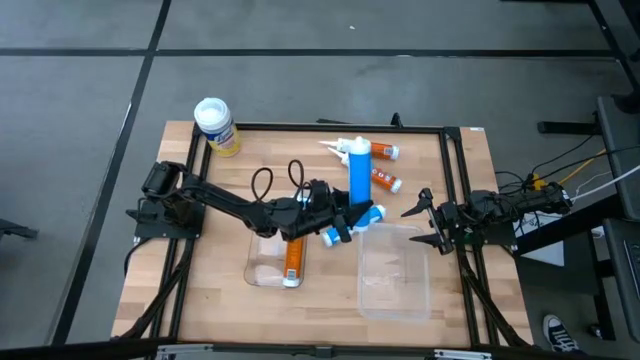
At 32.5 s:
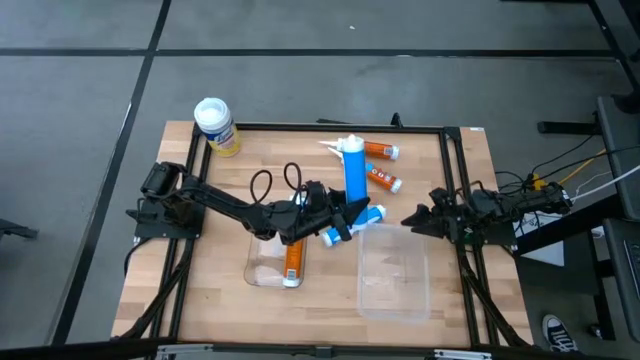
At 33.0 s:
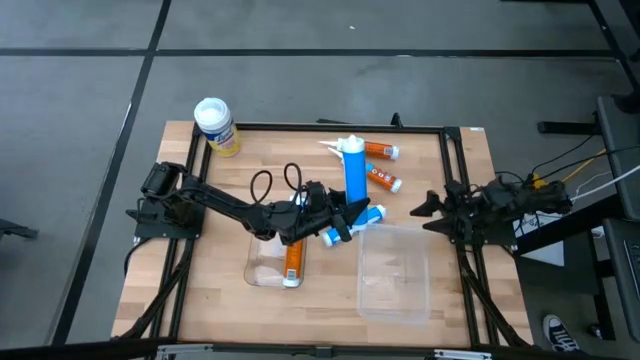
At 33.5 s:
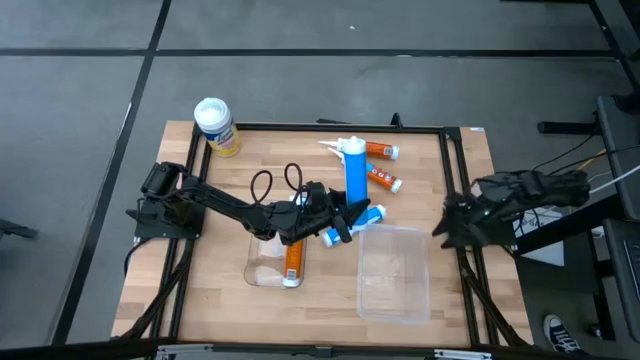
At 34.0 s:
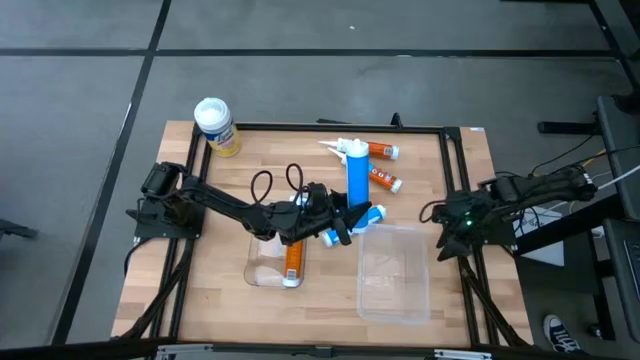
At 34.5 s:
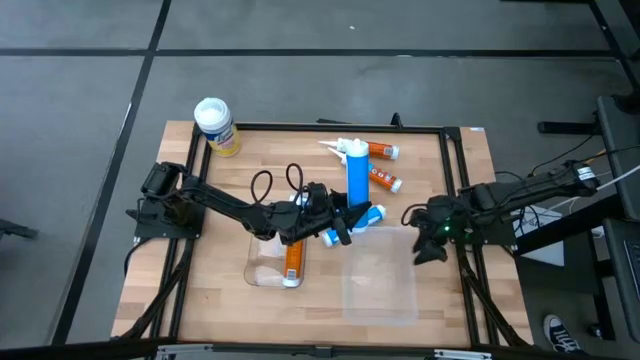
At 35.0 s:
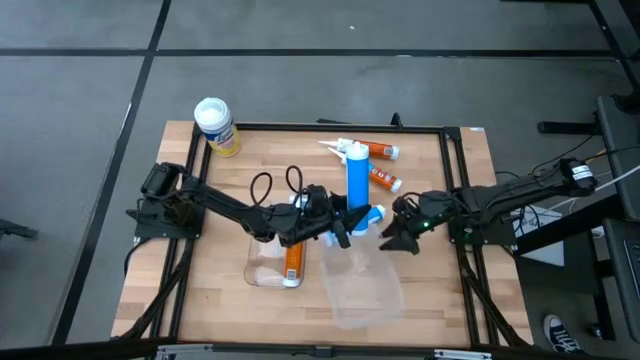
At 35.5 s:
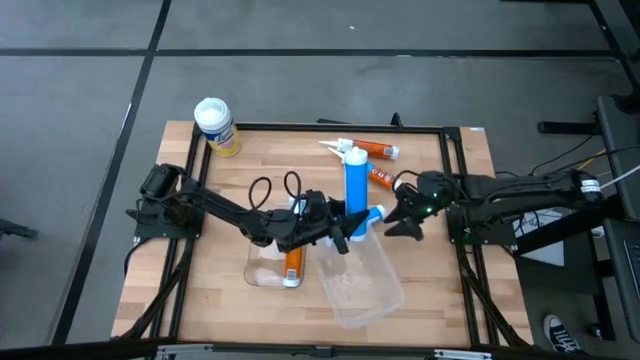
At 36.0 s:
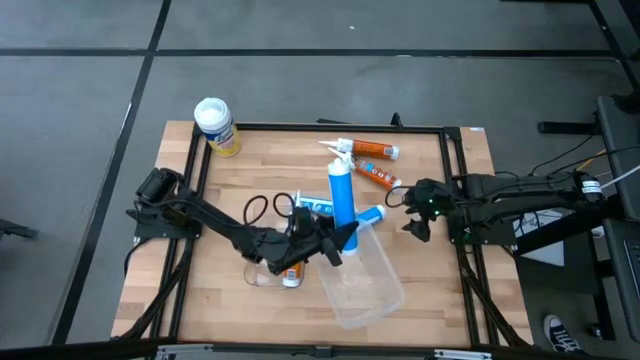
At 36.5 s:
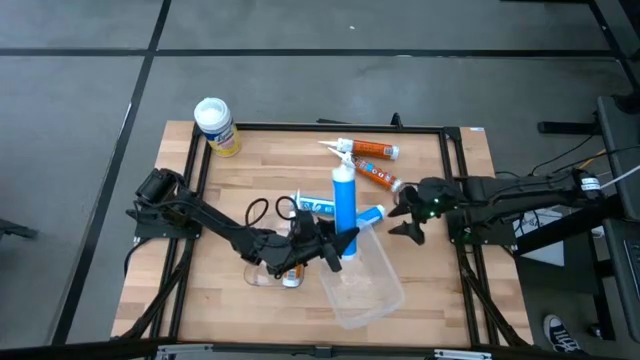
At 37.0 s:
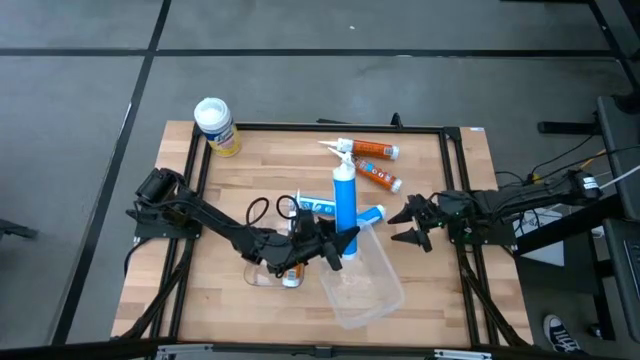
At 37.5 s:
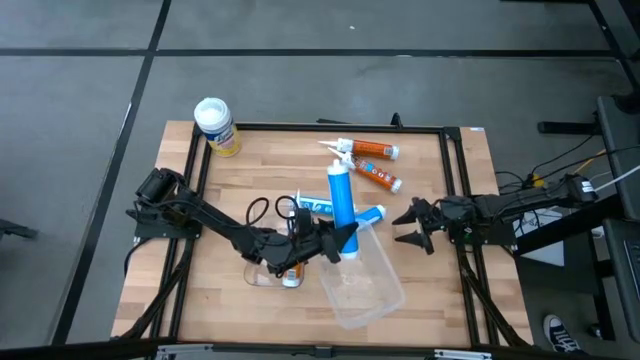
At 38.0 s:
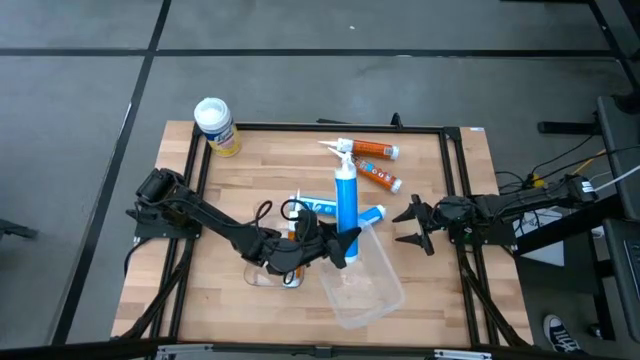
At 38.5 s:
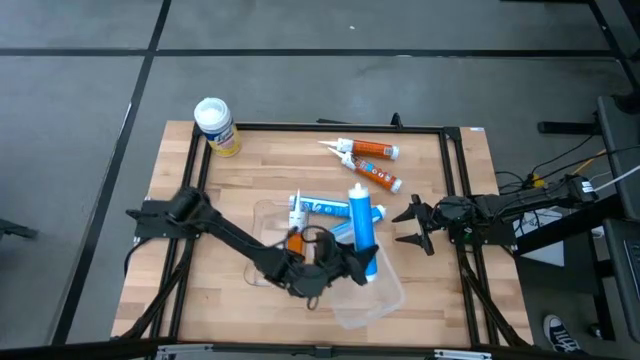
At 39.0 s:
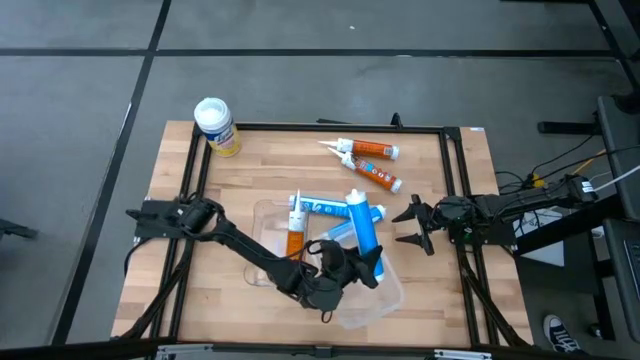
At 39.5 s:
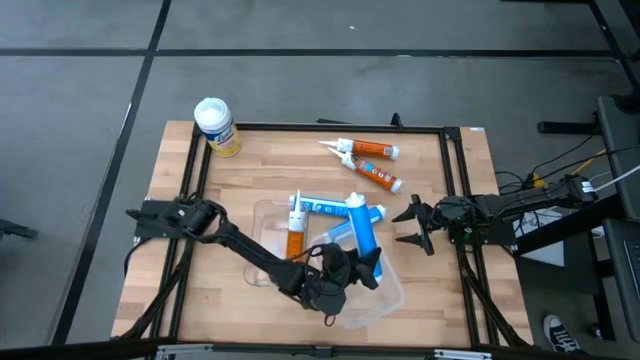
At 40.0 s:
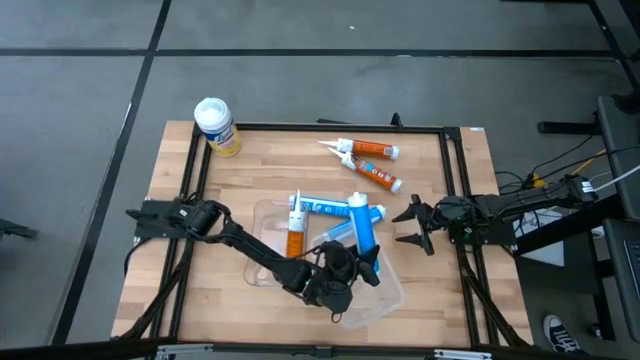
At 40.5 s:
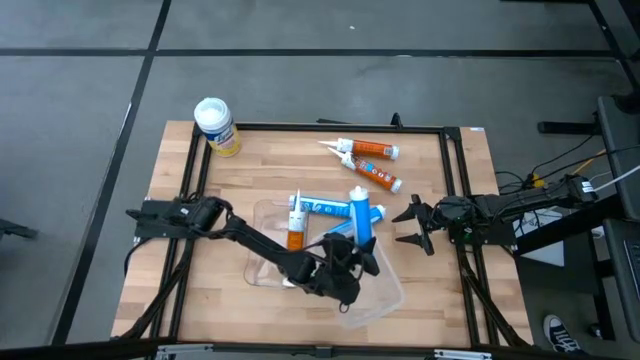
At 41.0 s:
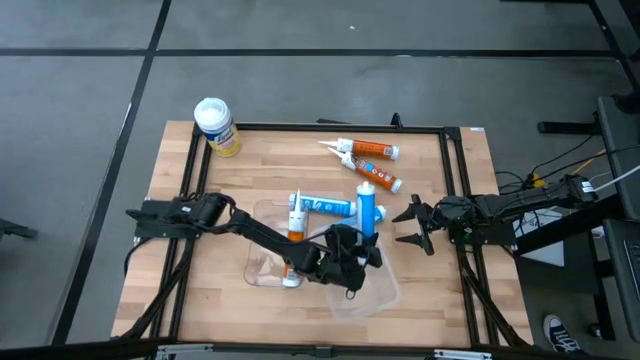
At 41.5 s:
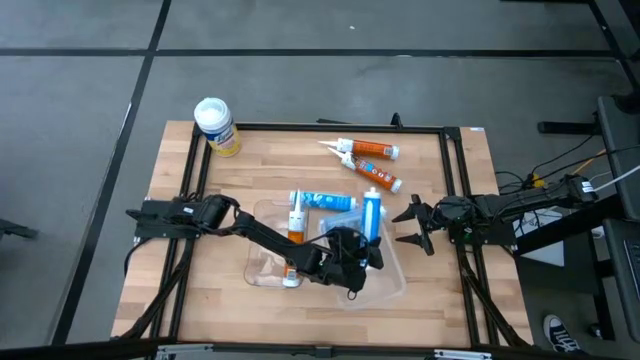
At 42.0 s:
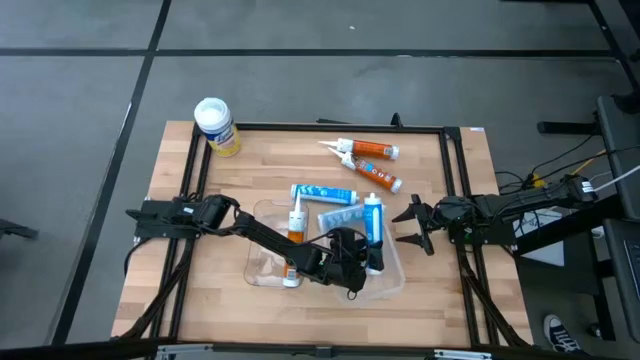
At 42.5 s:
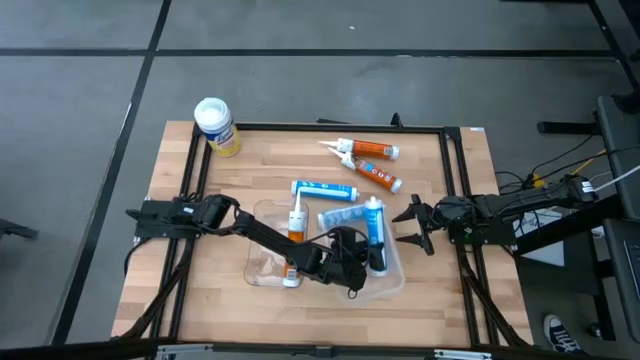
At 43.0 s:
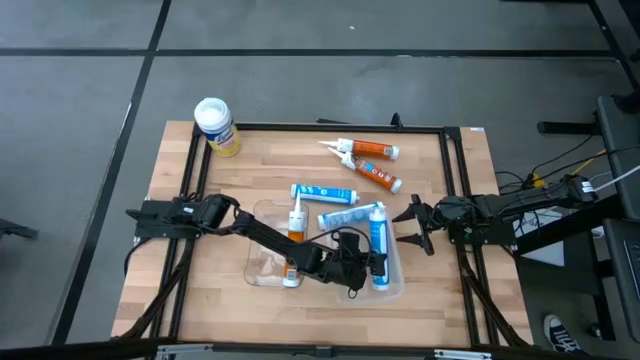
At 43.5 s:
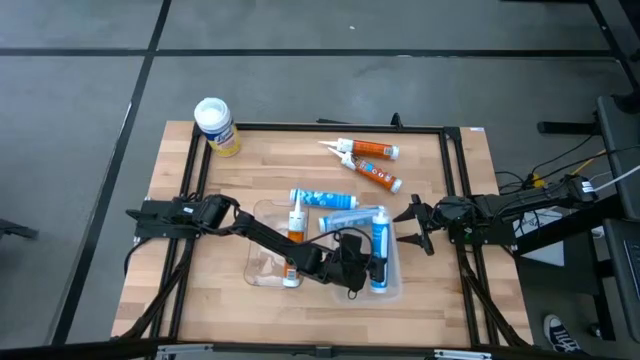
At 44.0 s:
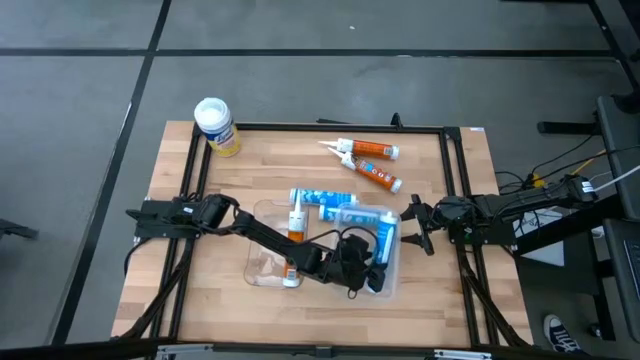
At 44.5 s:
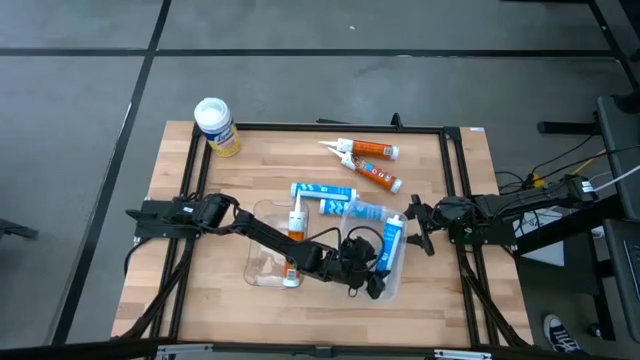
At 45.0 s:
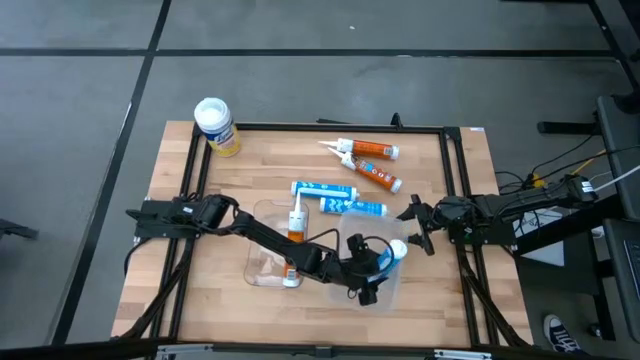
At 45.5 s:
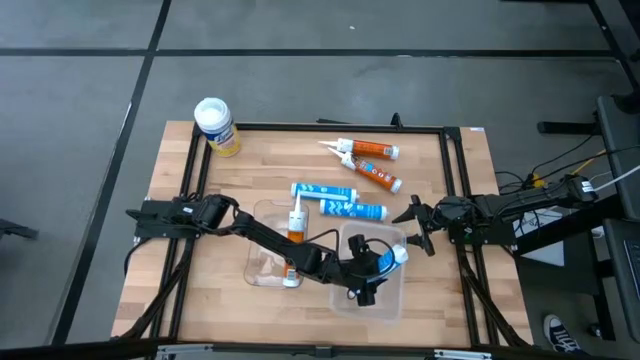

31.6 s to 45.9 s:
Task: Pick & place silicon tubes, Sealant and Lysol wipes
Put the top blue sealant into the right transparent bin

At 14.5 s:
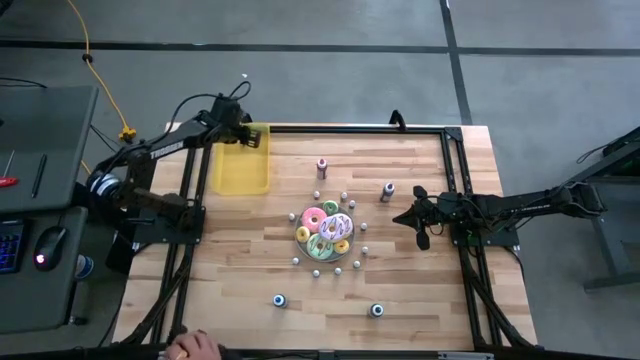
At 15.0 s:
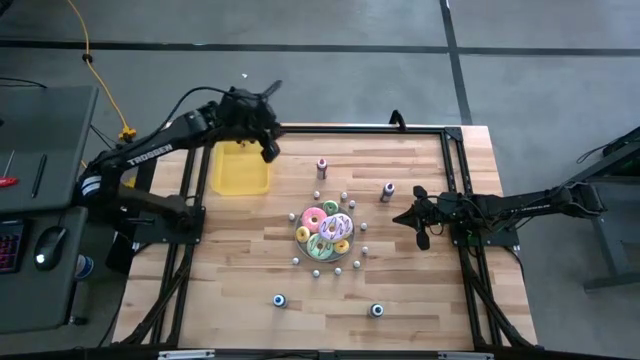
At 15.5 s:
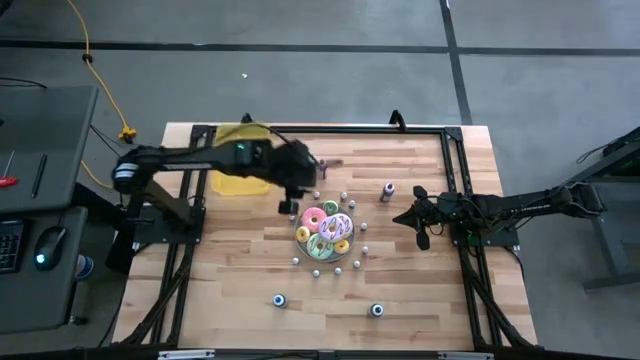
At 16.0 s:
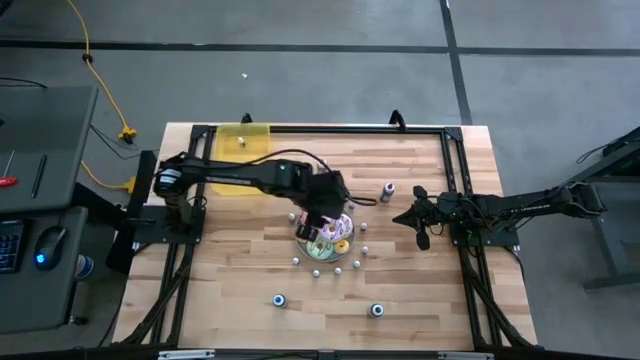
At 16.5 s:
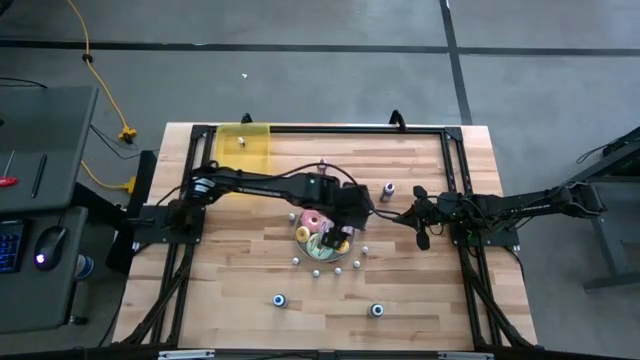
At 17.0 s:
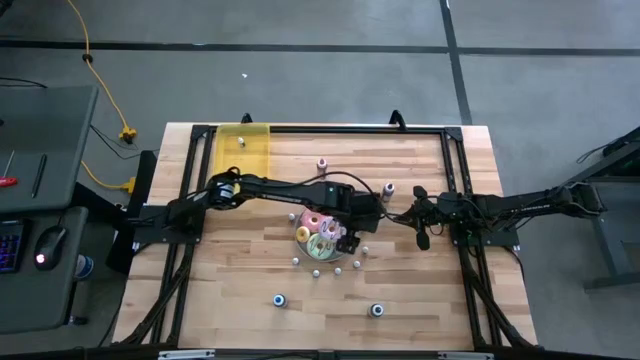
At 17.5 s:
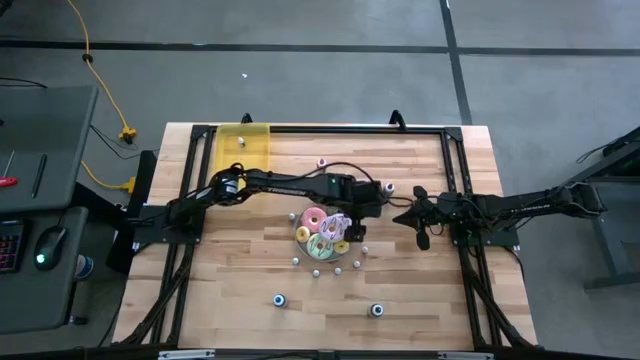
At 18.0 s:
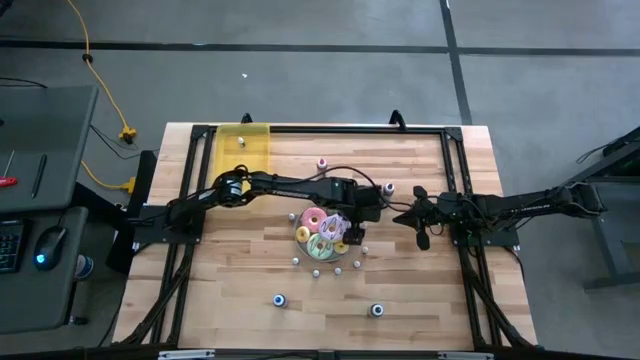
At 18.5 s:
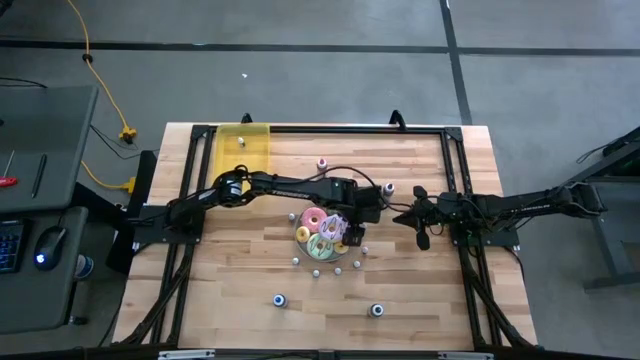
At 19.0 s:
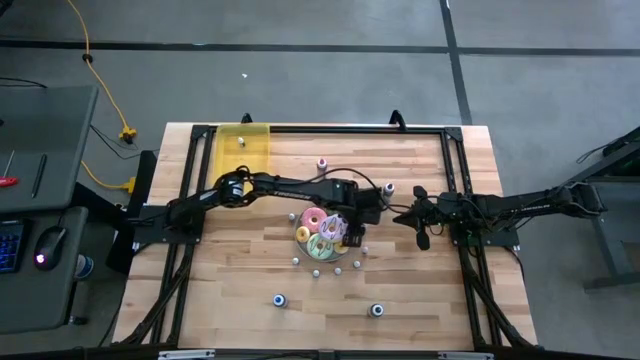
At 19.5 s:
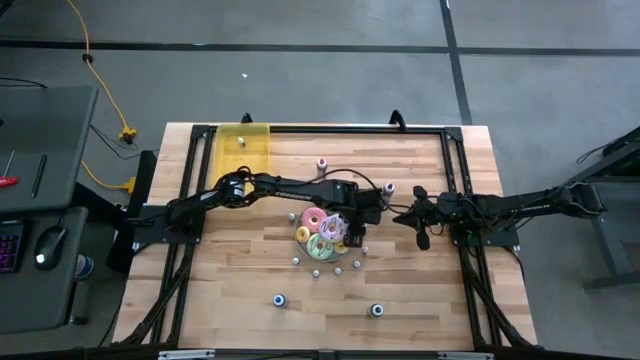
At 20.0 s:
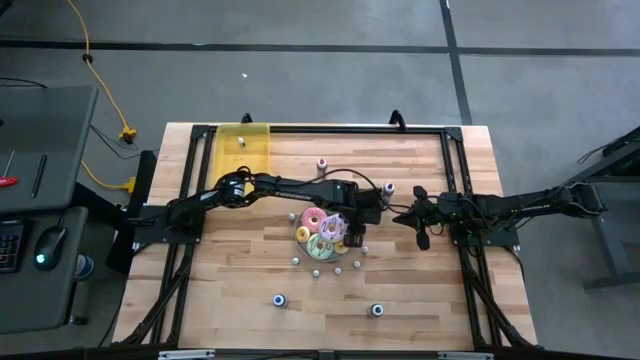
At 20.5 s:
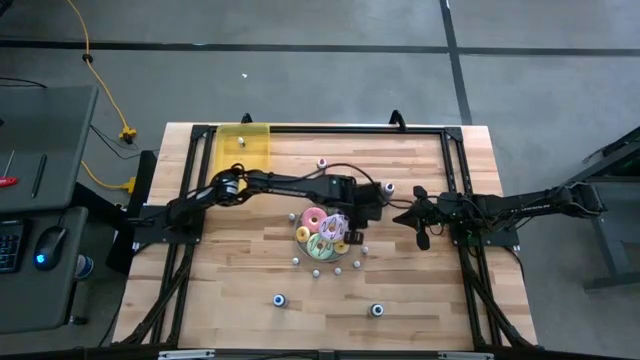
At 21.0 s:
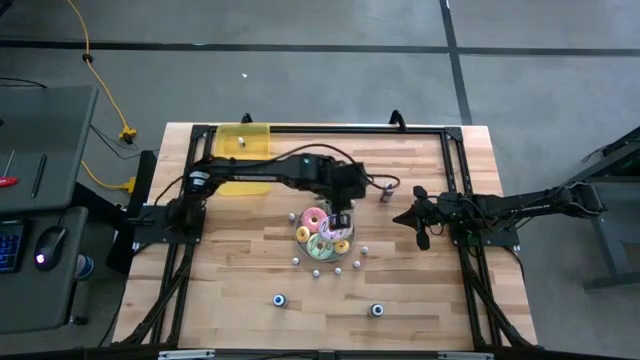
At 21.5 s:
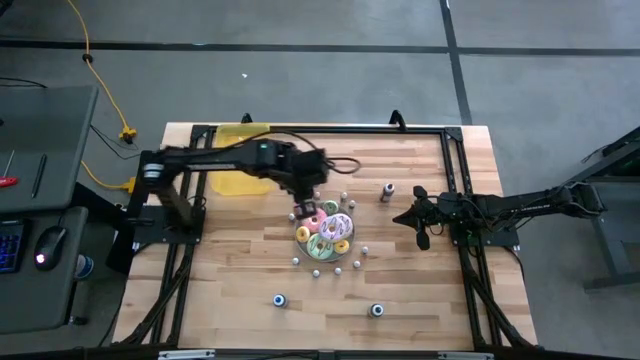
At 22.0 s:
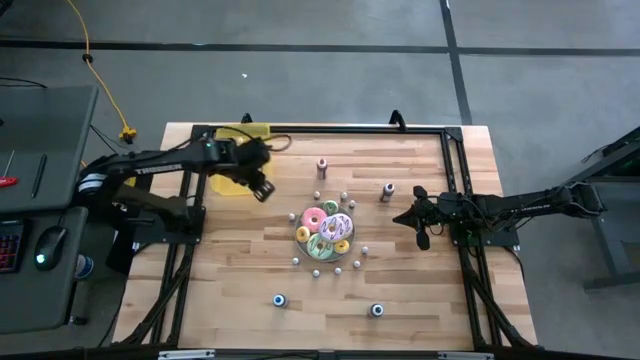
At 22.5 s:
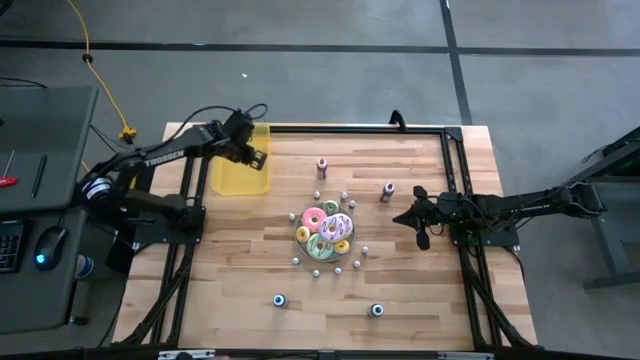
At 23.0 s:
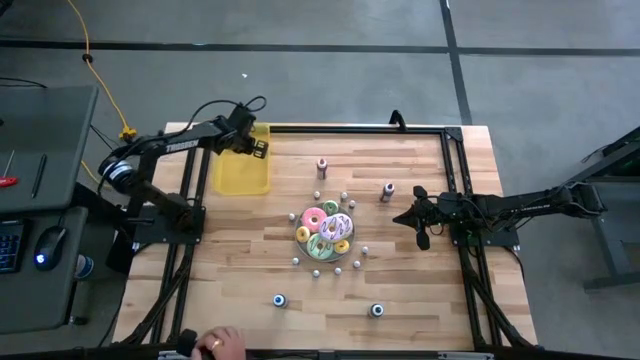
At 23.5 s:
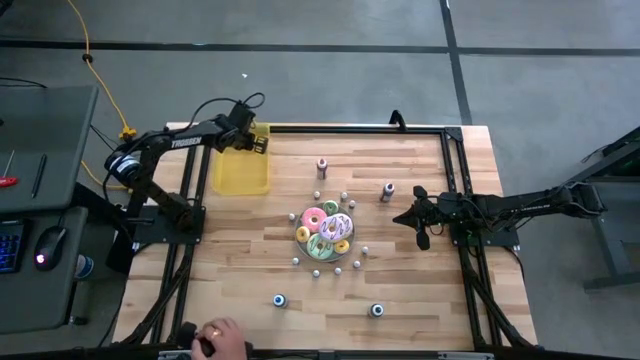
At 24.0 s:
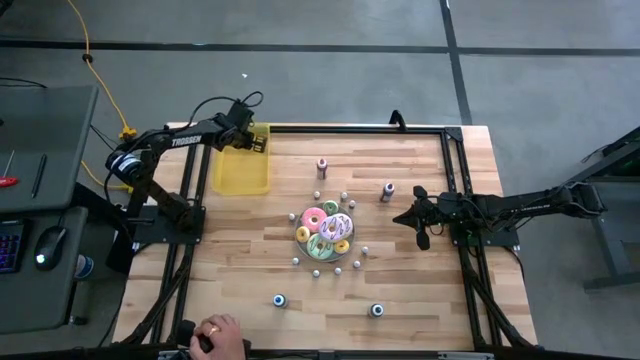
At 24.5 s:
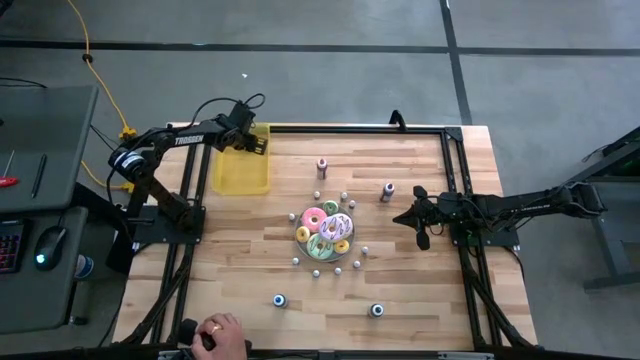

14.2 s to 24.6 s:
Task: Pick & Place food coloring
Put the small black food coloring bottle into the yellow bin
